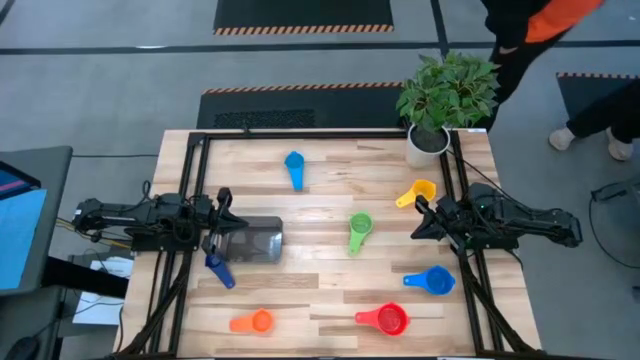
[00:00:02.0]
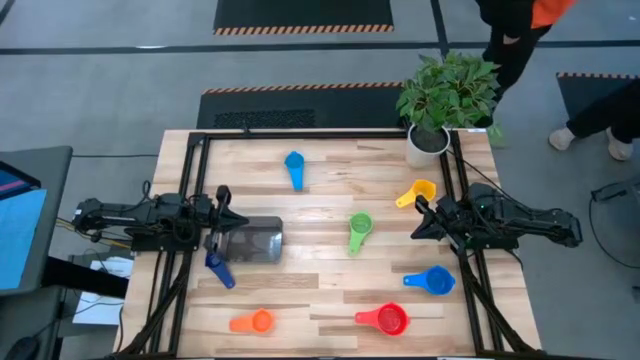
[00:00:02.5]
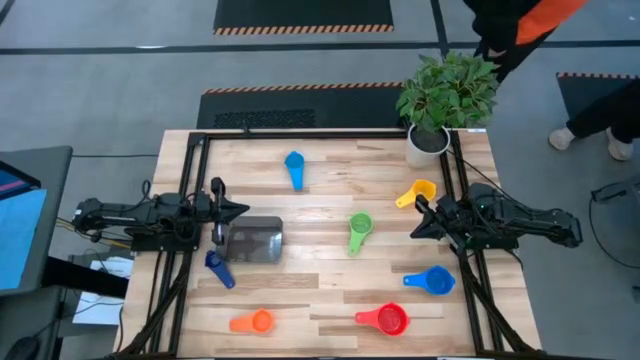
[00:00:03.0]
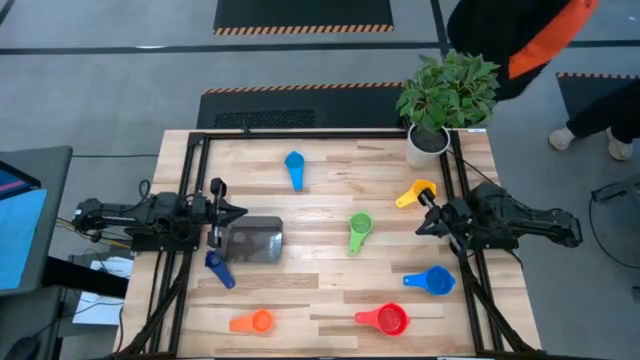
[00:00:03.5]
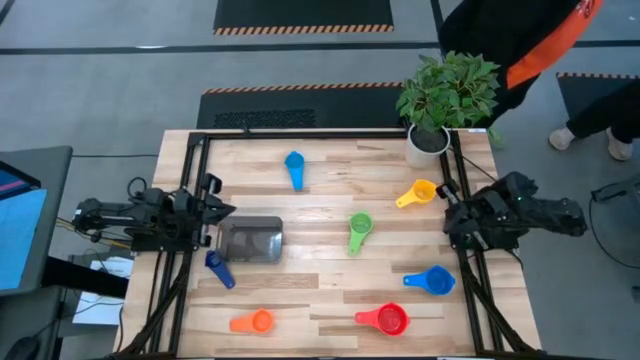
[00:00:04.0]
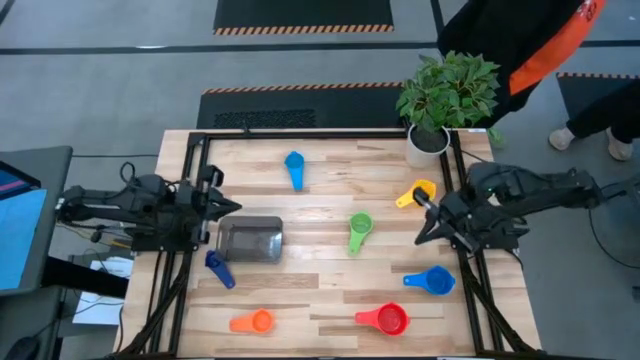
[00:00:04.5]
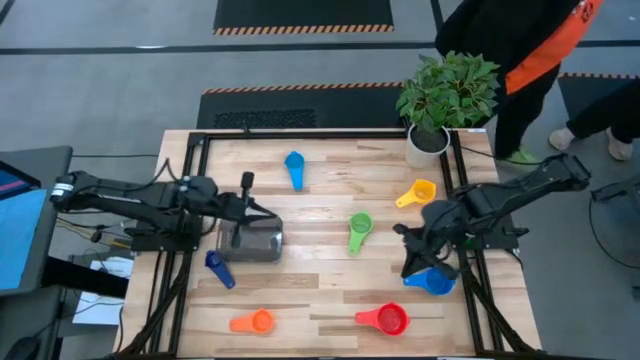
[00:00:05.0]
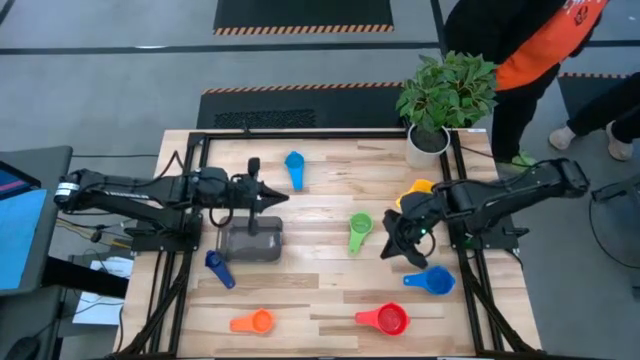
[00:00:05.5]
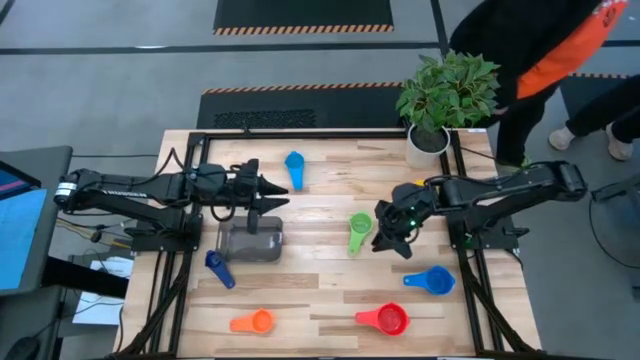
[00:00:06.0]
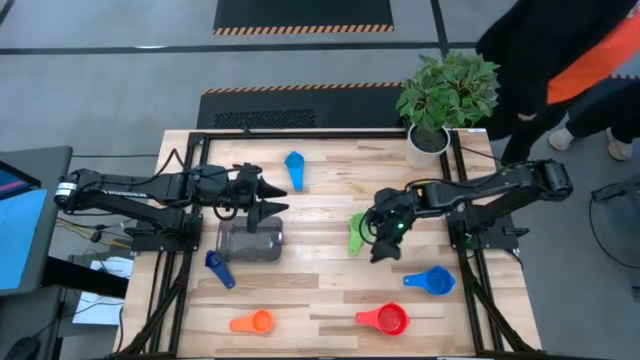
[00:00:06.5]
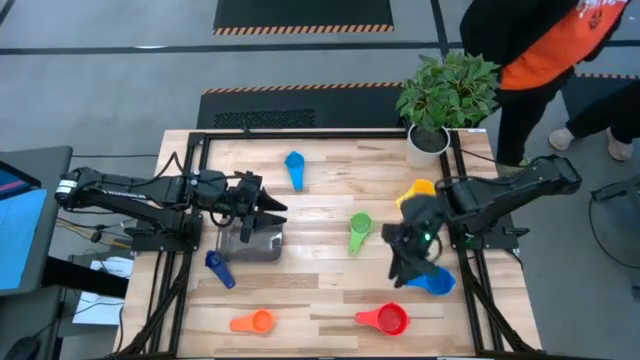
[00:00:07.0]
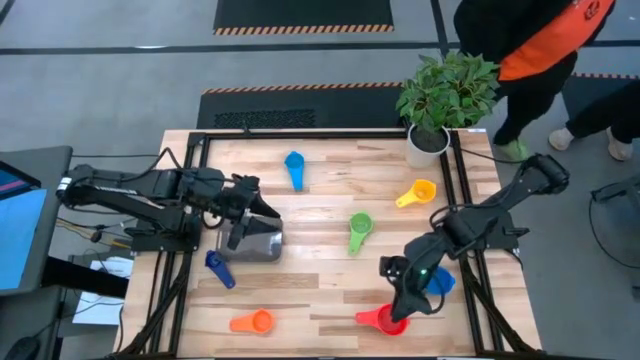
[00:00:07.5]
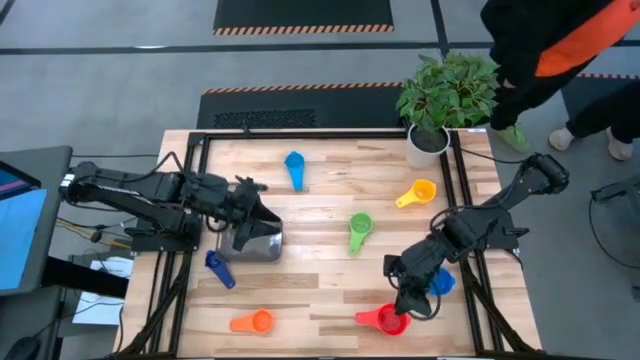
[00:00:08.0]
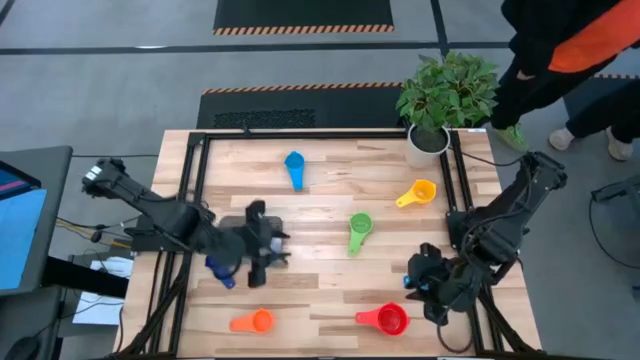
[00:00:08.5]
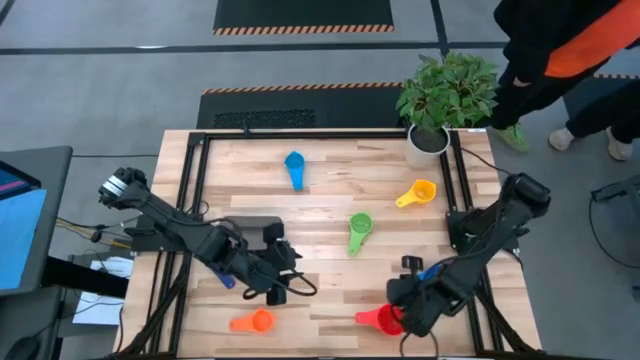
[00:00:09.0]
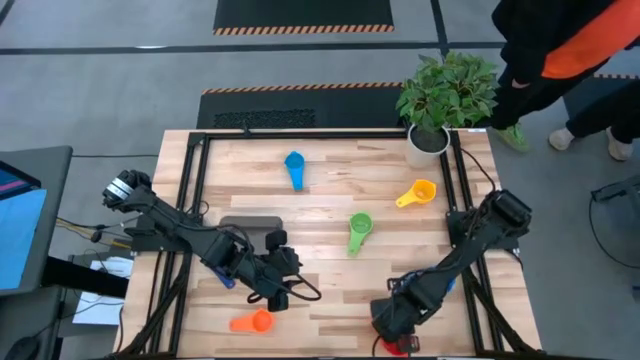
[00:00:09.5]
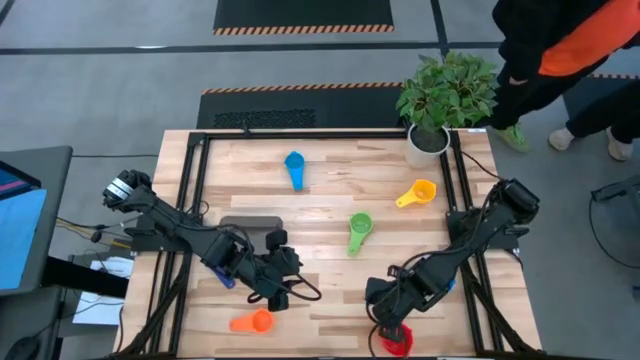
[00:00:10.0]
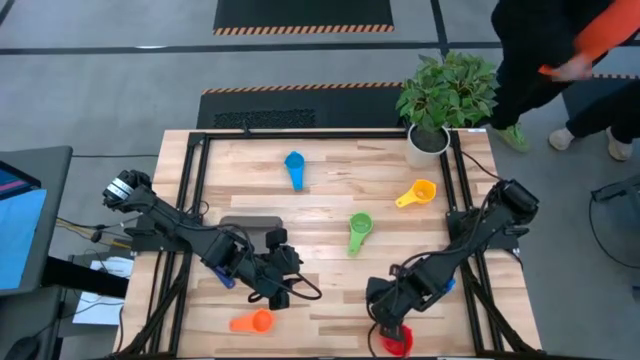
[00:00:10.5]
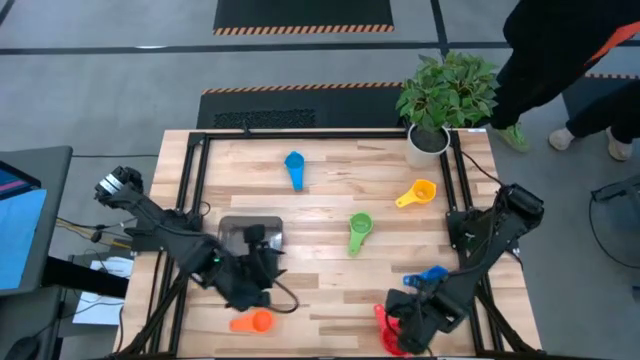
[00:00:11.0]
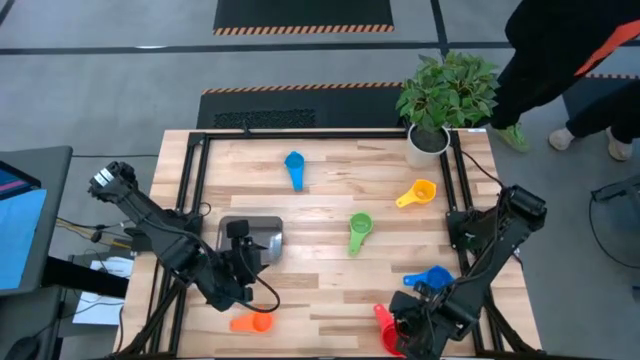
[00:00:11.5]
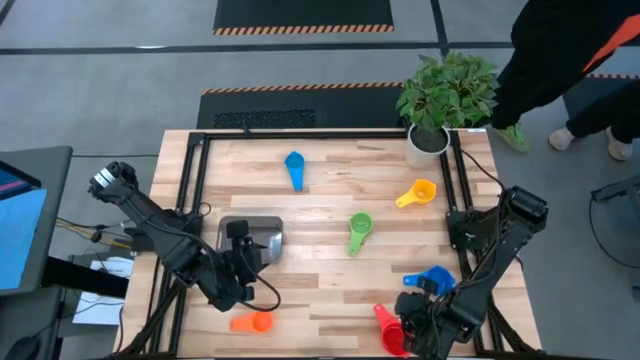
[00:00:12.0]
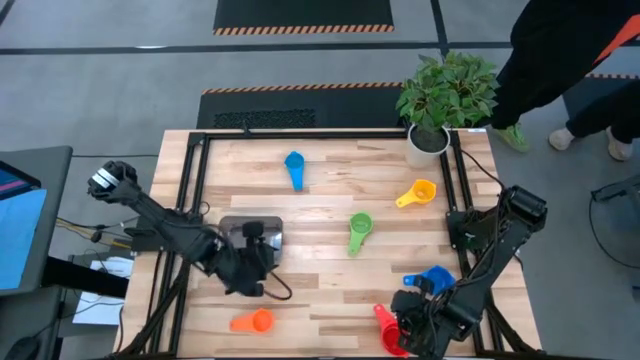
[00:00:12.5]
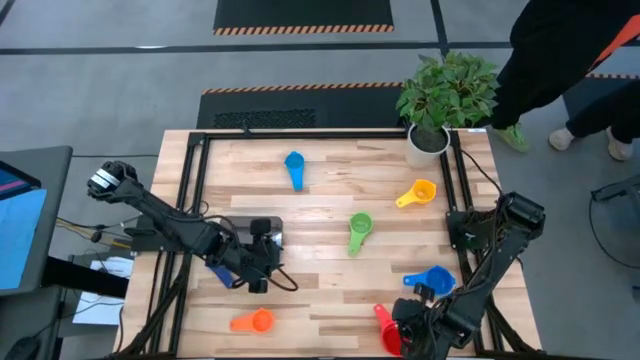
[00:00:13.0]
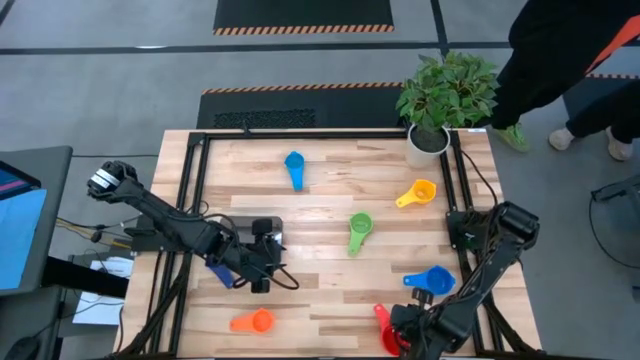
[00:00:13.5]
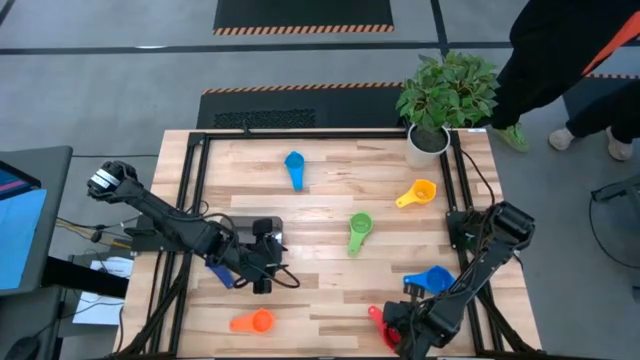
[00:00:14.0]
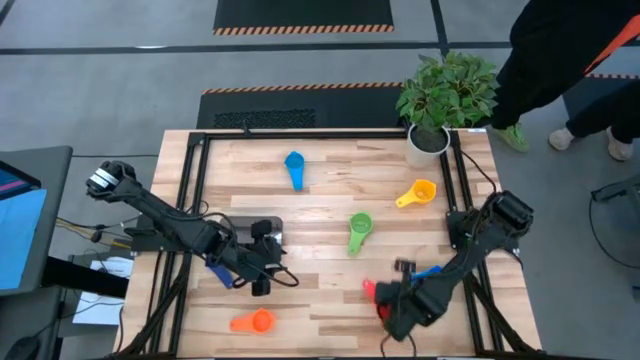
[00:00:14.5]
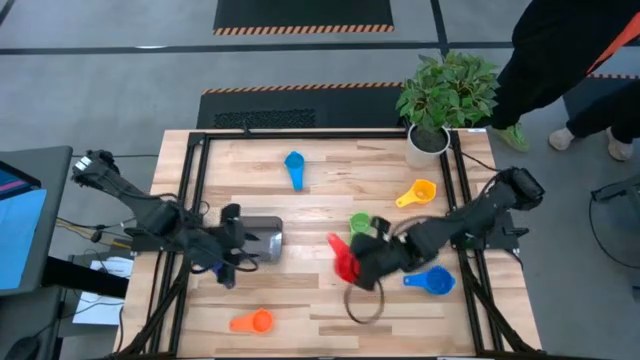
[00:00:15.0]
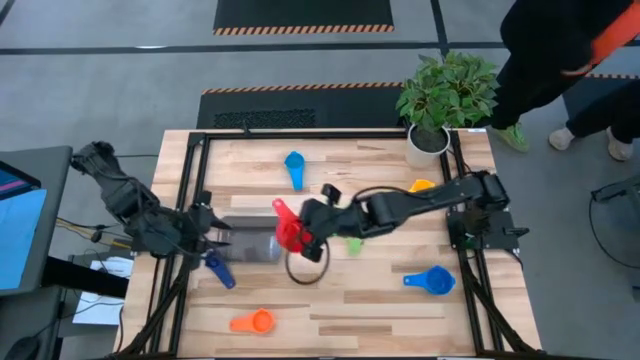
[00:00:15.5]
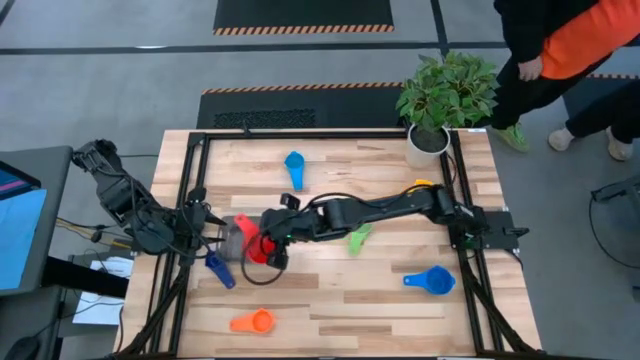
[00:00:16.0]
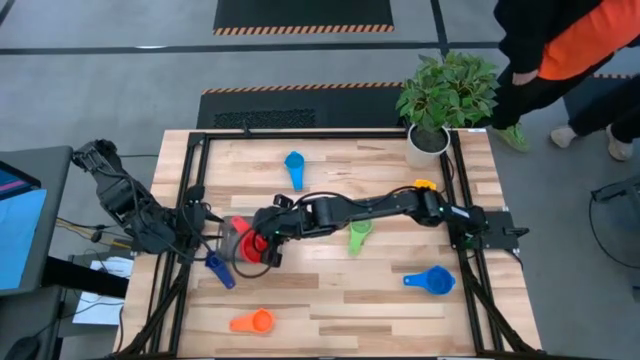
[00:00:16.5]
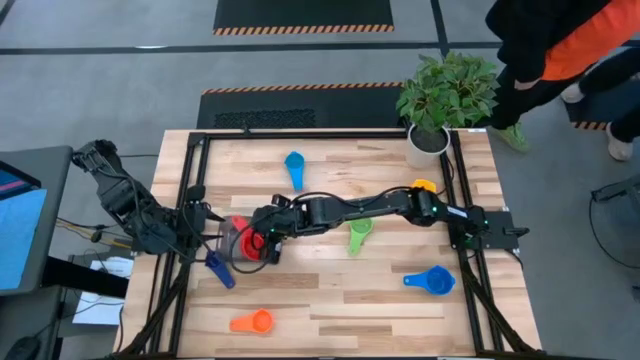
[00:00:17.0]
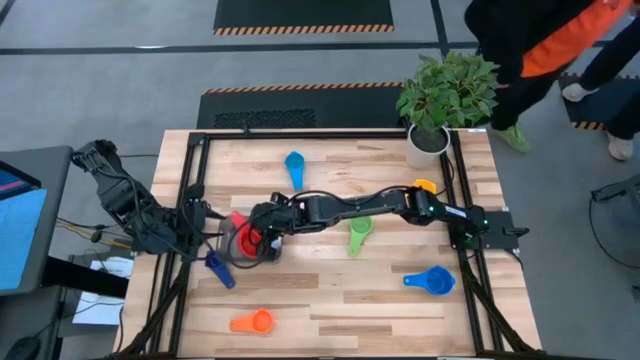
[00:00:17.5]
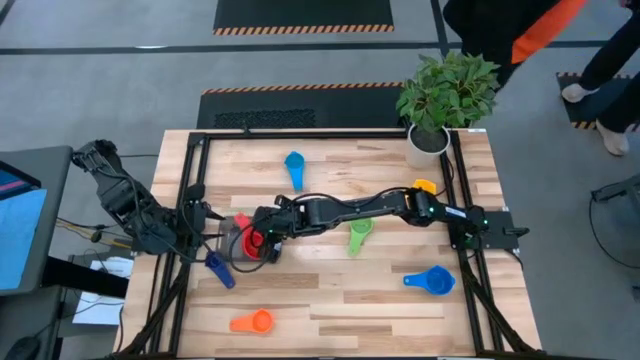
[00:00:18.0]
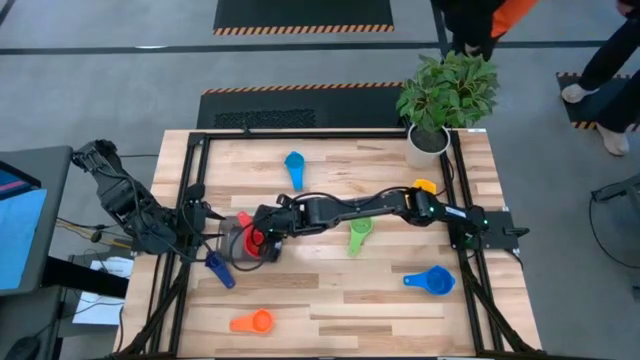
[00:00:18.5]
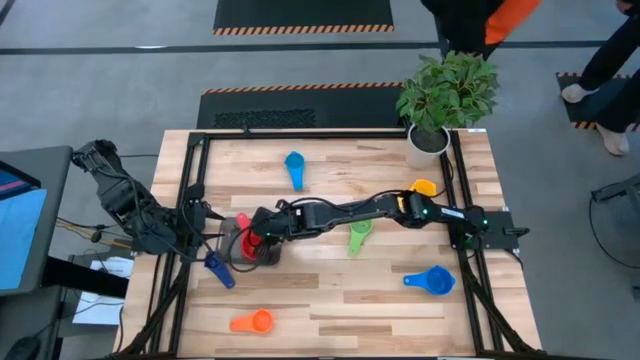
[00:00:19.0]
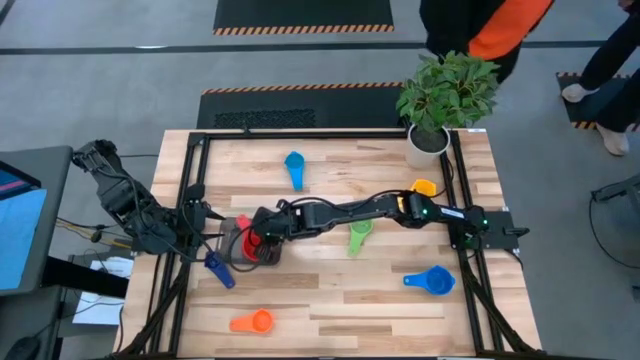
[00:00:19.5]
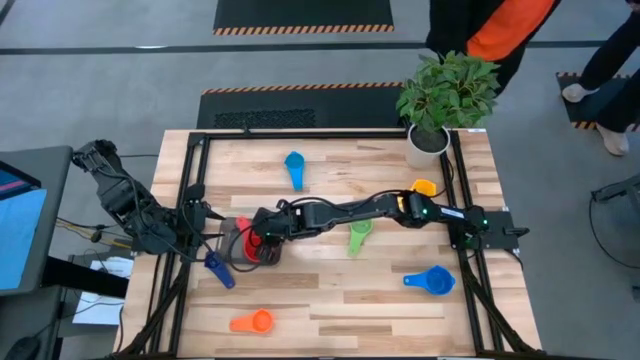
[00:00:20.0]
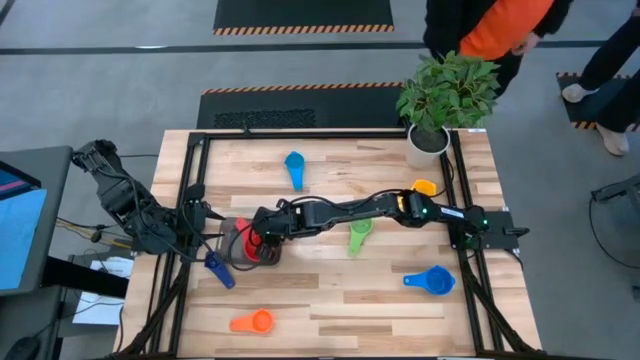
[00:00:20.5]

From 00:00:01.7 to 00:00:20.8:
Task: Nest measuring cups in basket
Put the red measuring cup into the black bin
